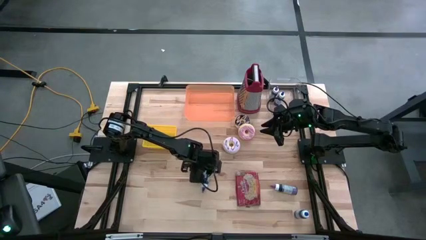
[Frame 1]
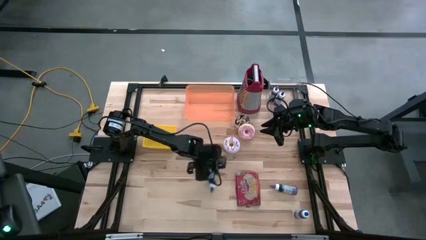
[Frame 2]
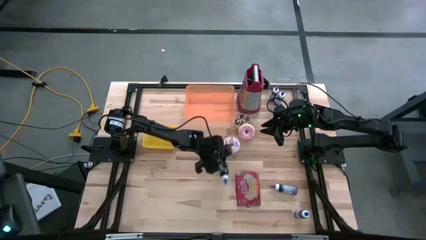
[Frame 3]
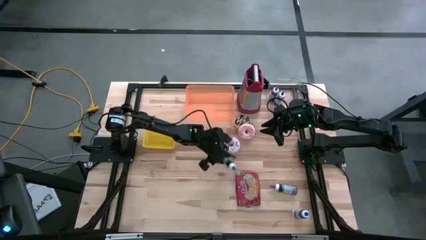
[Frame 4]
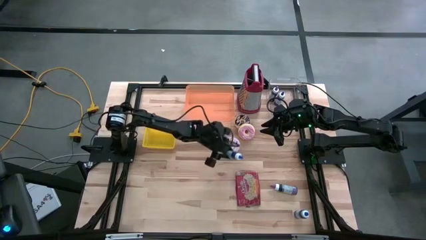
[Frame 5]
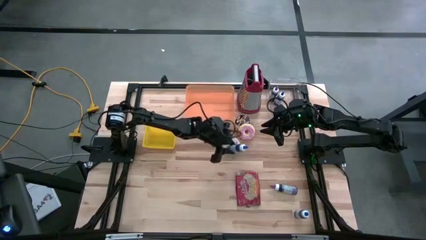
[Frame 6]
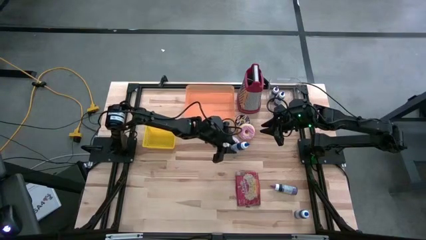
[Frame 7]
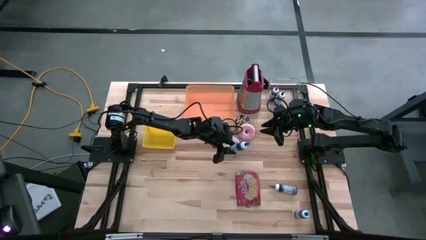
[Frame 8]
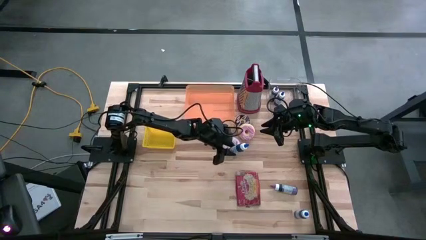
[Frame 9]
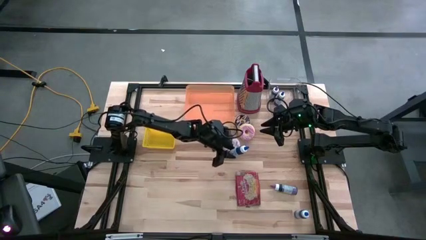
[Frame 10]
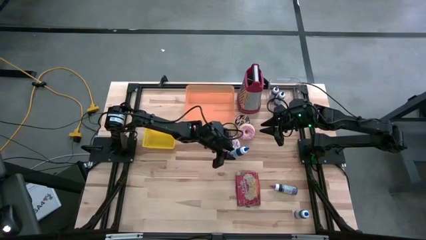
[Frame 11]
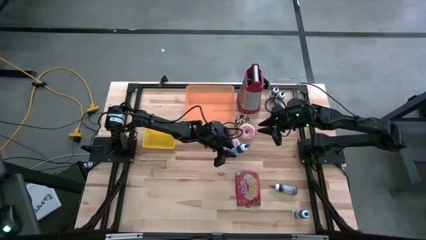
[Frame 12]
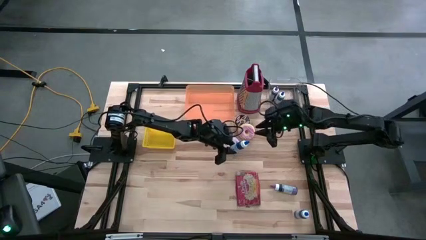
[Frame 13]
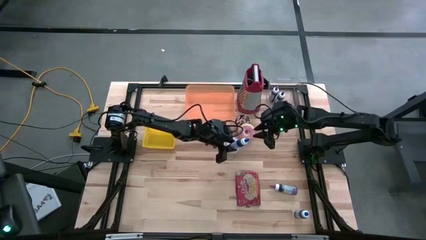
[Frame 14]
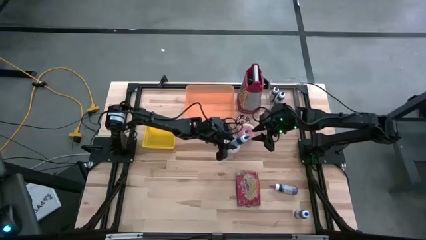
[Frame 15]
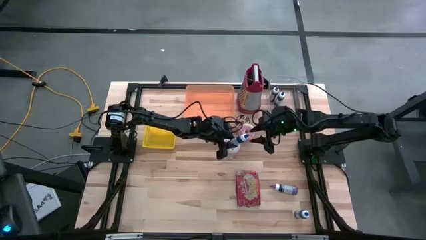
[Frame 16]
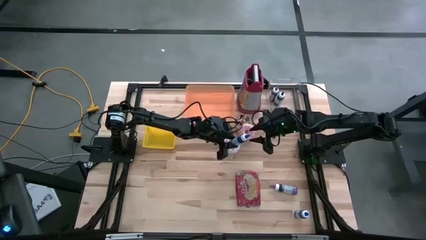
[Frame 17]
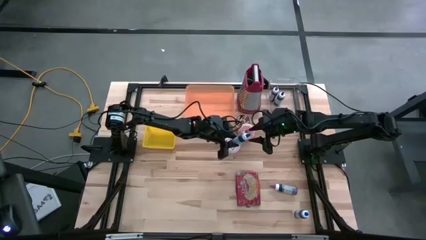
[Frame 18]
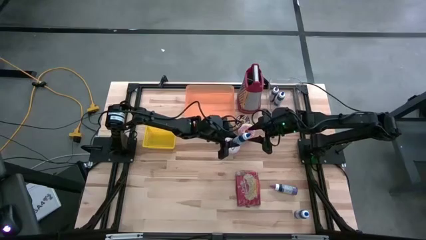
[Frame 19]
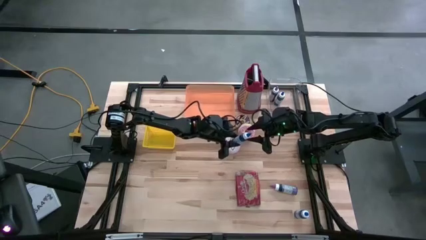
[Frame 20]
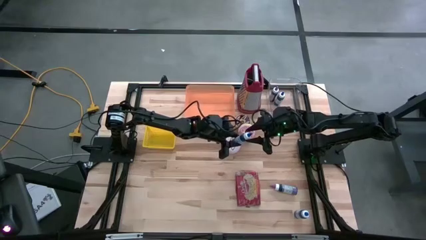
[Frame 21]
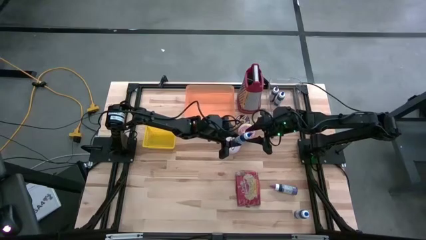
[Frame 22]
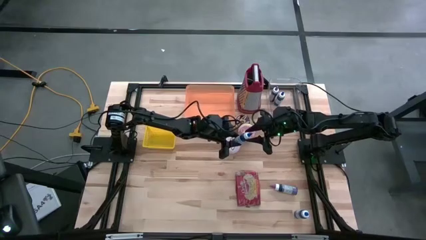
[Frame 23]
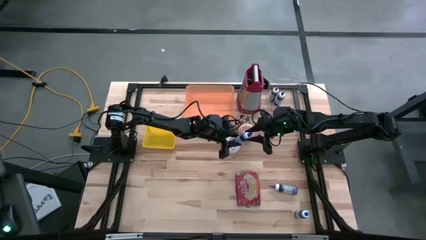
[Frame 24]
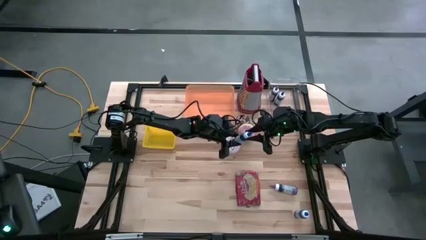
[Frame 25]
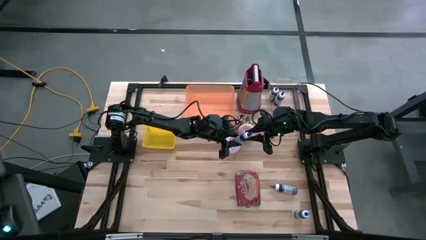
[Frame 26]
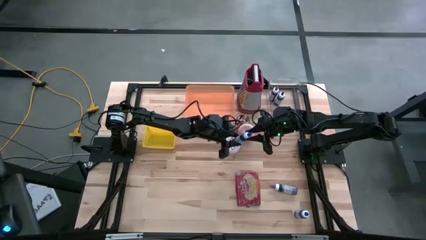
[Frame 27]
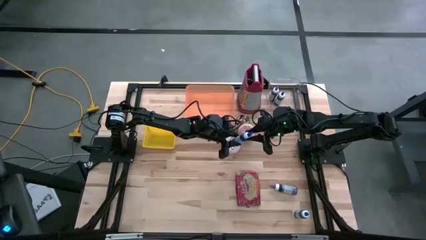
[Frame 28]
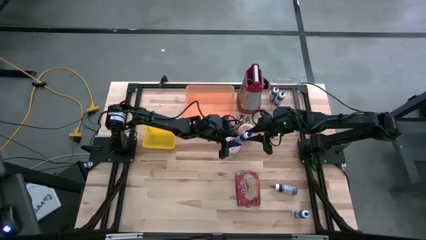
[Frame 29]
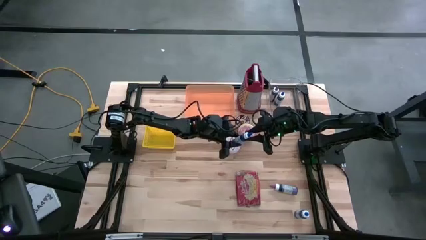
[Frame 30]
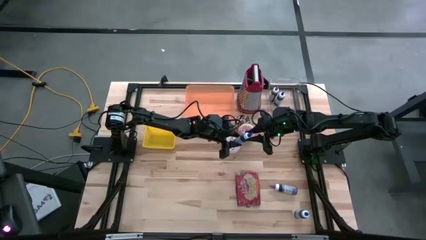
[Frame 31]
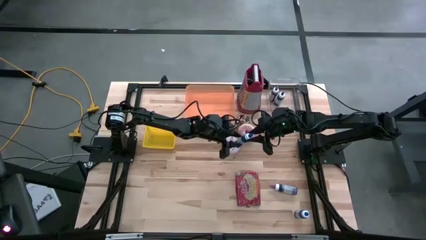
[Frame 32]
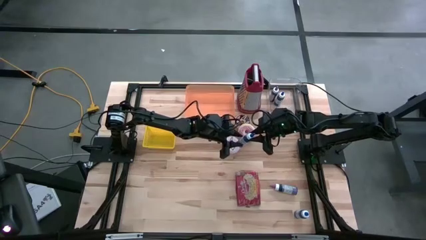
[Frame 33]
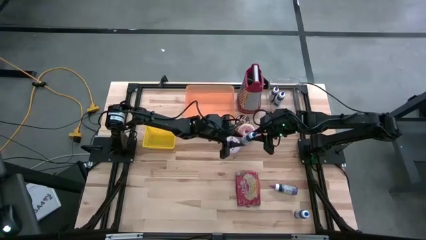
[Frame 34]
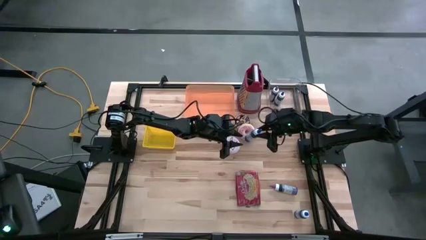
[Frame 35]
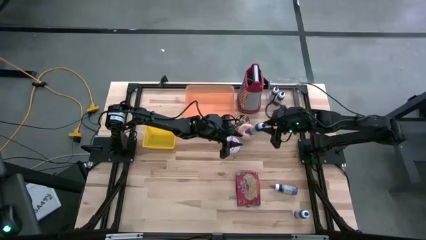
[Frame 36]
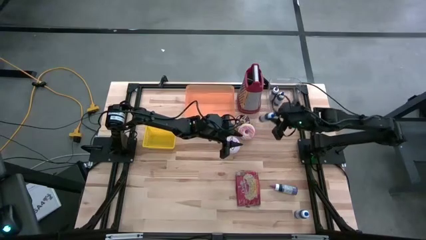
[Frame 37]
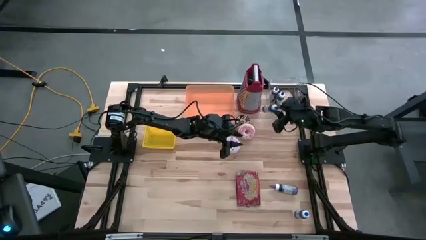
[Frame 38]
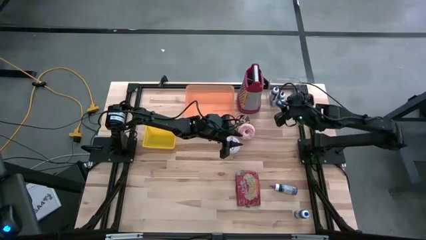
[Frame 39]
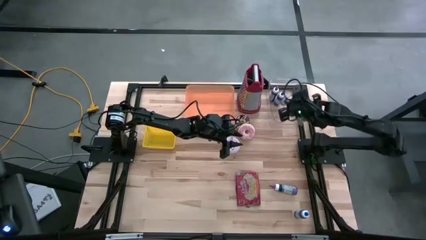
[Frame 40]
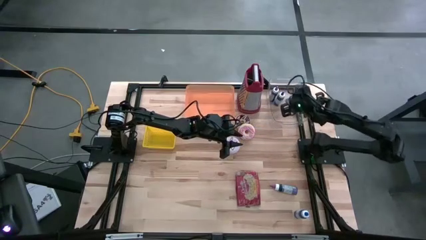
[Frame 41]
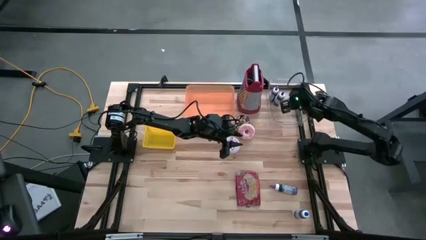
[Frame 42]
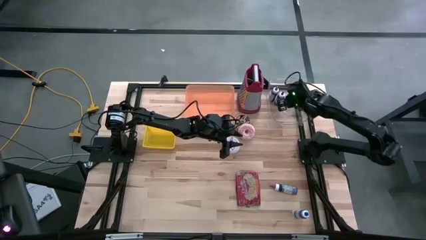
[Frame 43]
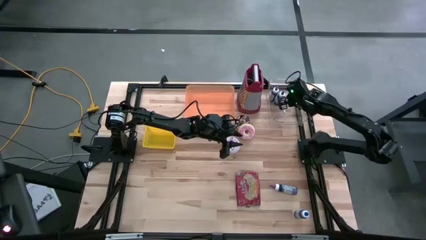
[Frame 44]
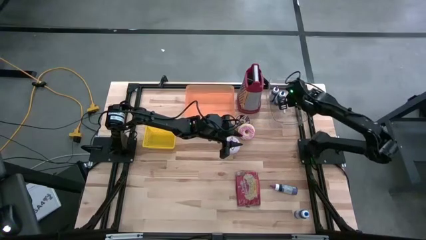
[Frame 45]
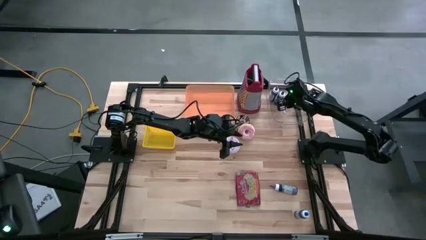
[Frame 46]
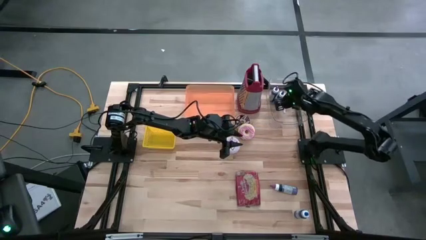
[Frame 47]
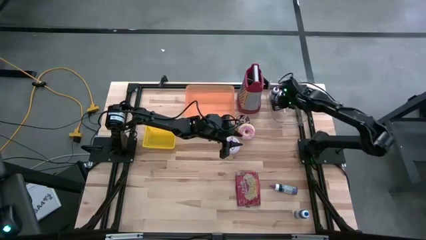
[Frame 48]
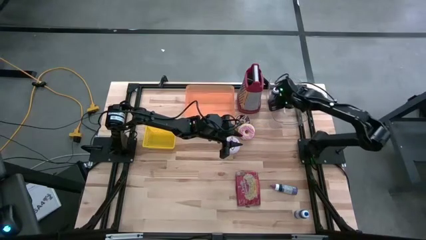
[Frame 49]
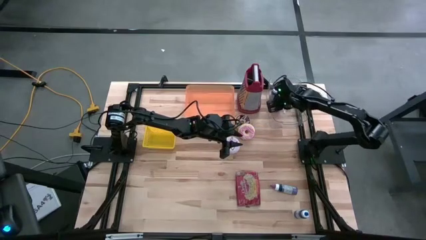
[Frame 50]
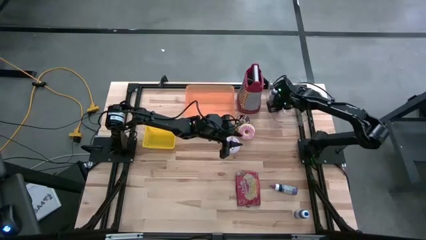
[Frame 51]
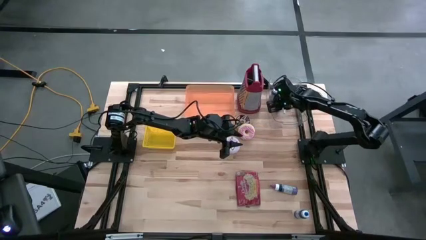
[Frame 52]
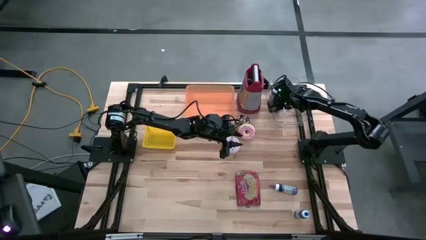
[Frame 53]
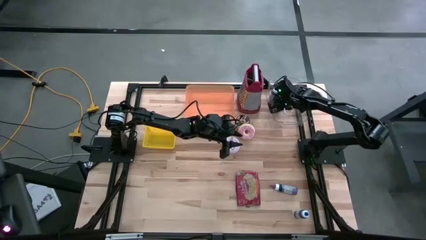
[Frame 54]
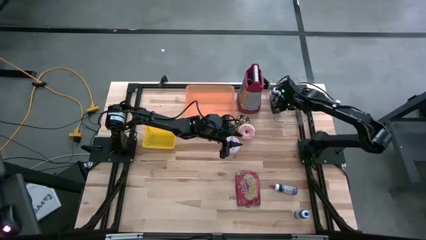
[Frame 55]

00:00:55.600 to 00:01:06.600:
Task: Pick & Place Food Item
Put the left blue food coloring bottle into the transparent bin

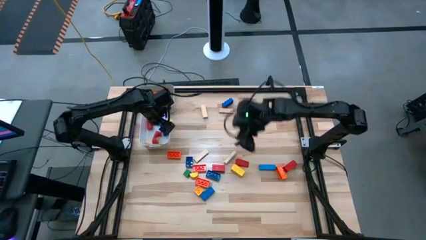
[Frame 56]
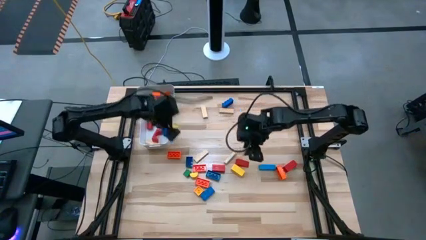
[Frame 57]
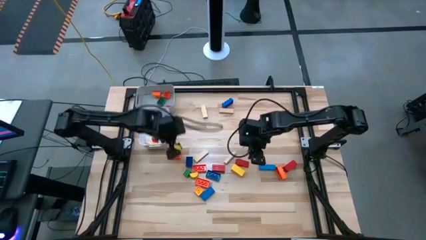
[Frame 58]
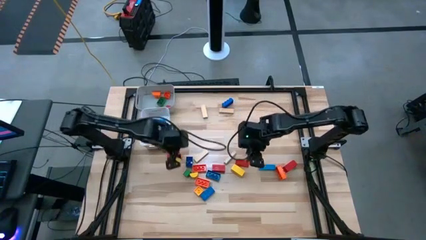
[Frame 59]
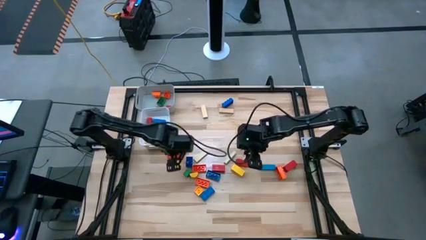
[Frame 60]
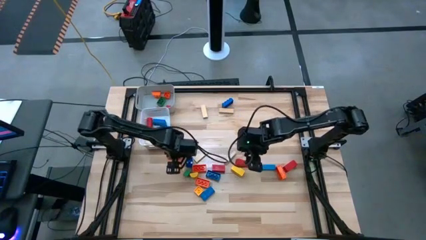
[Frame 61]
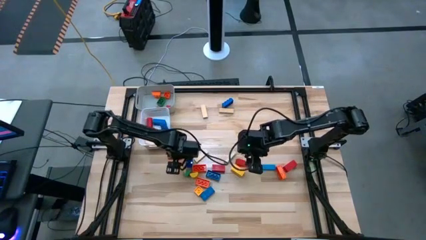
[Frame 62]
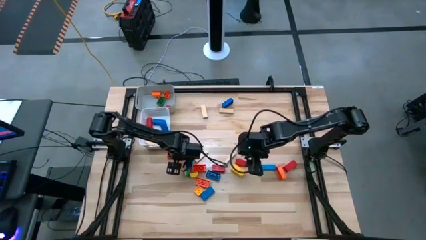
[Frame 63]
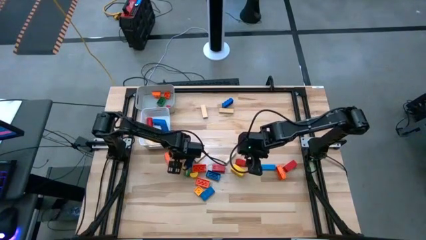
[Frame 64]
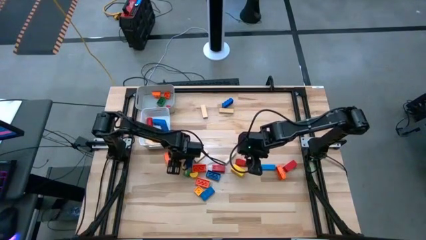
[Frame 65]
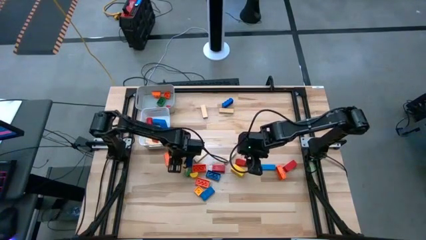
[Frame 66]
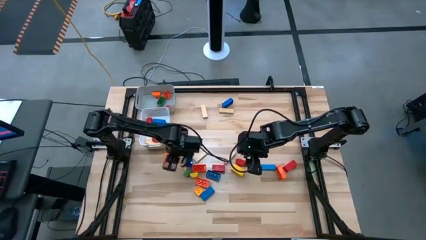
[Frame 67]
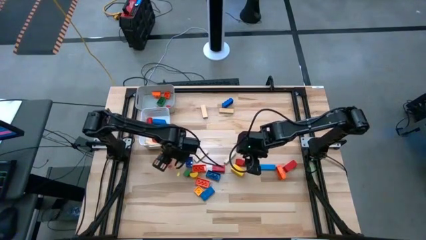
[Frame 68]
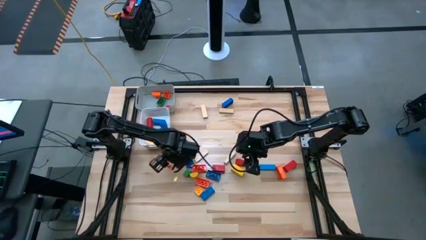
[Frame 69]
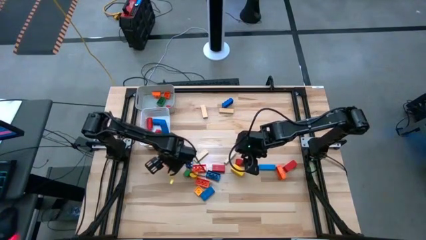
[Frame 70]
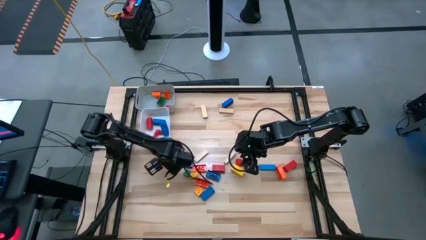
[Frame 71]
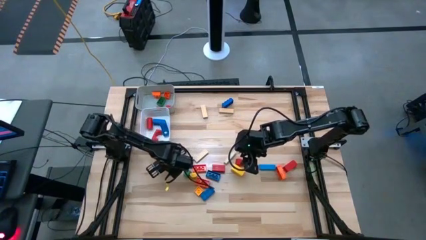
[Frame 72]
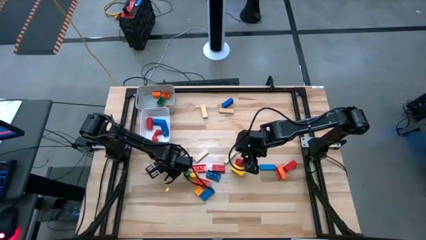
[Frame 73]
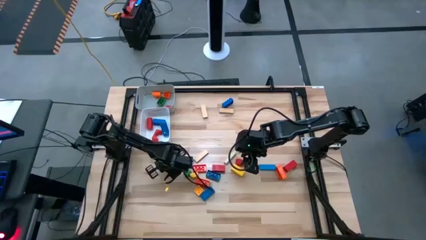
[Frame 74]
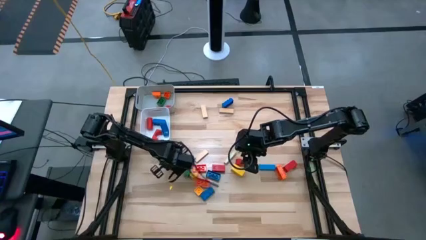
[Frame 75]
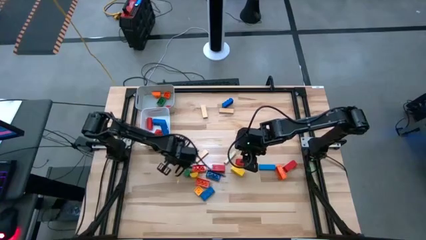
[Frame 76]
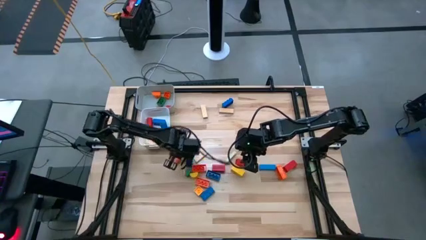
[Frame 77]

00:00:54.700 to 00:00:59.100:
Task: Sort blocks by size
Put the large orange game piece into the white bin

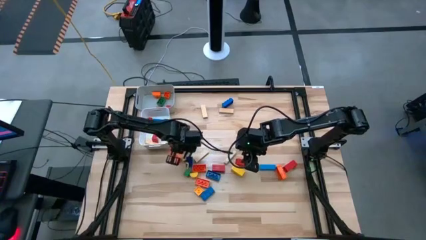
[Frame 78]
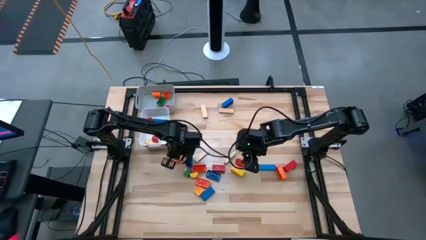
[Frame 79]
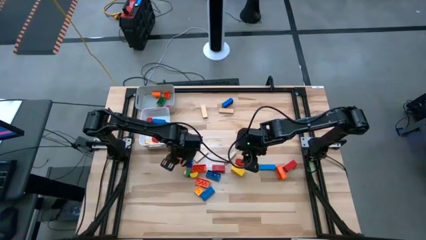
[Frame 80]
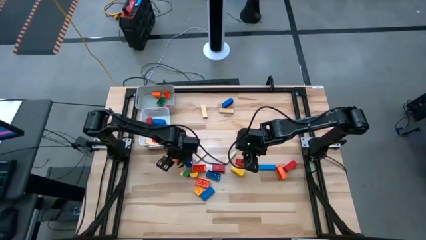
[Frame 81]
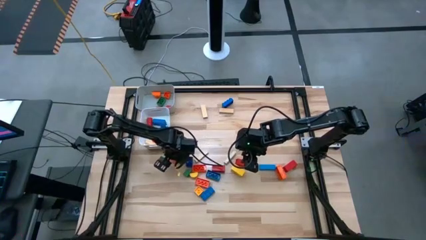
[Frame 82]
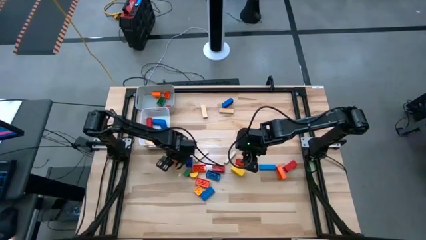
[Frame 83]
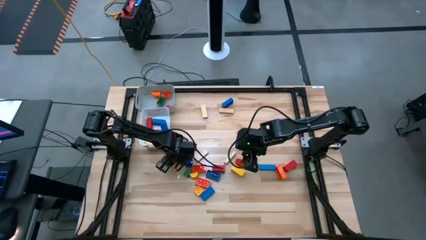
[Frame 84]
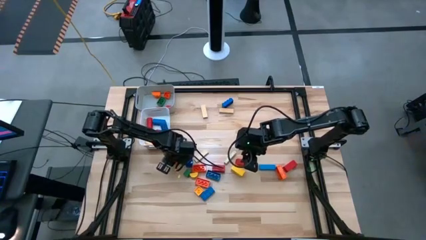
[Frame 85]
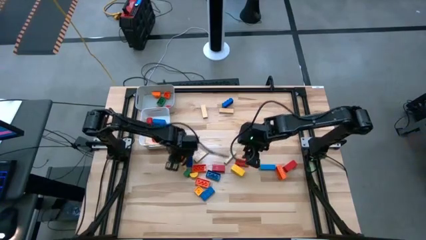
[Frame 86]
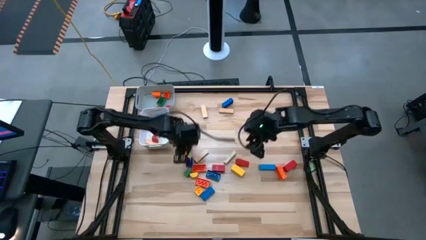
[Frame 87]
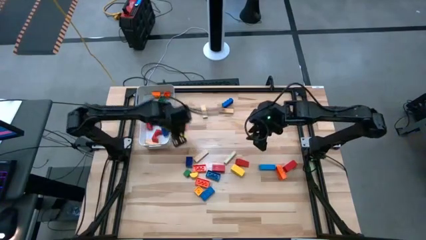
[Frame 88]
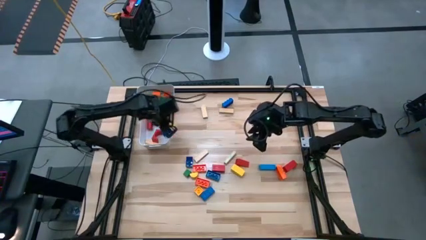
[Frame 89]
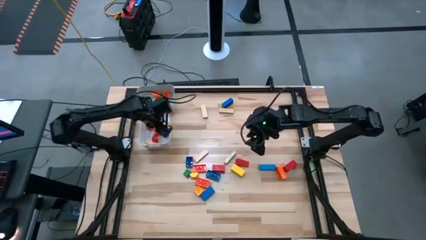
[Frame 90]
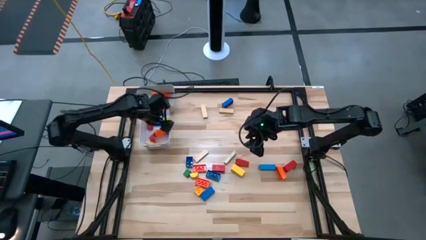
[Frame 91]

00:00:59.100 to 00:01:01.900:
Put the large orange game piece into the white bin
